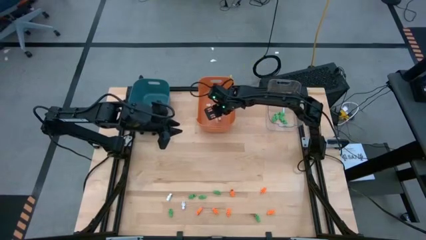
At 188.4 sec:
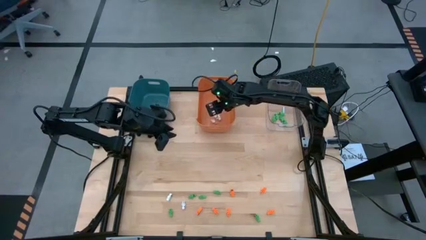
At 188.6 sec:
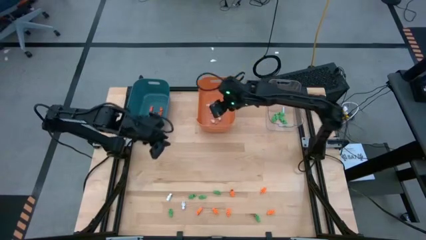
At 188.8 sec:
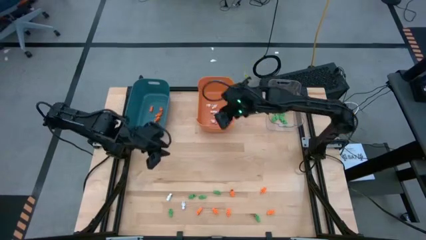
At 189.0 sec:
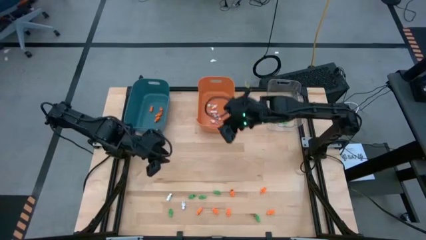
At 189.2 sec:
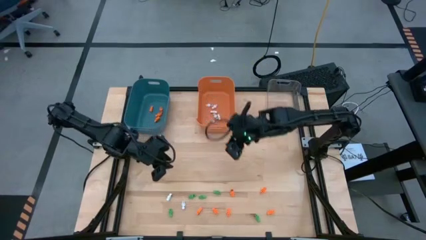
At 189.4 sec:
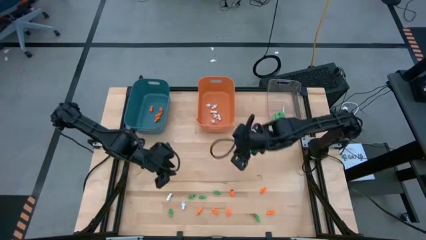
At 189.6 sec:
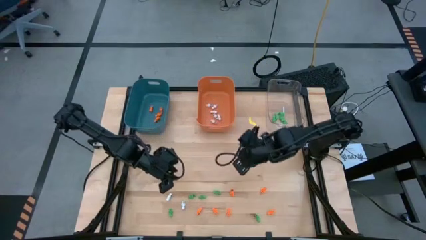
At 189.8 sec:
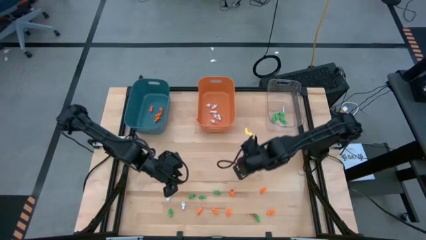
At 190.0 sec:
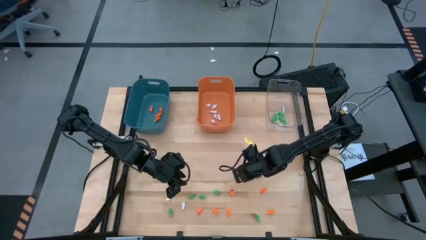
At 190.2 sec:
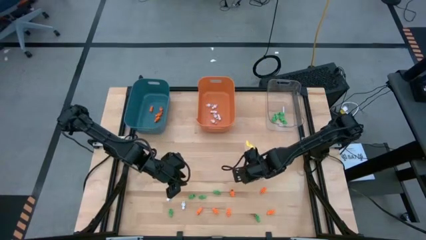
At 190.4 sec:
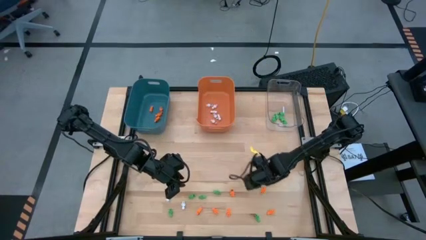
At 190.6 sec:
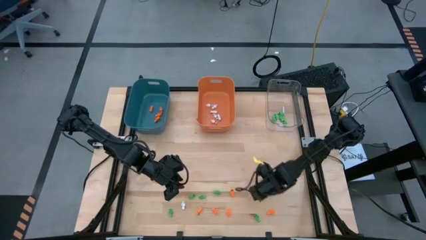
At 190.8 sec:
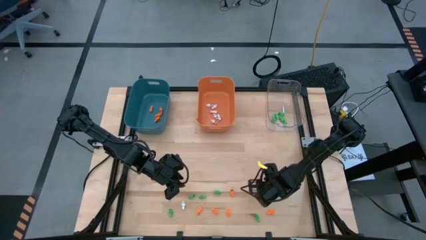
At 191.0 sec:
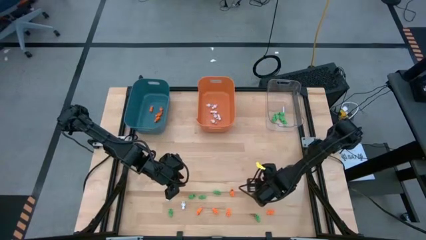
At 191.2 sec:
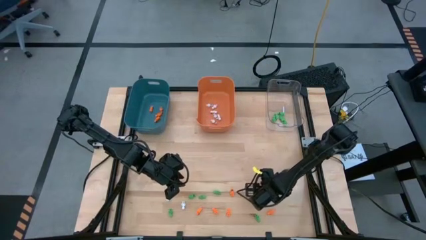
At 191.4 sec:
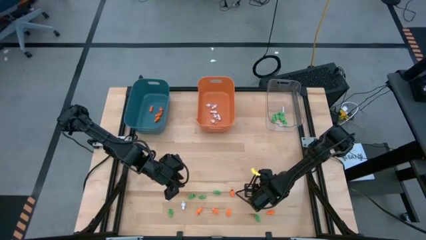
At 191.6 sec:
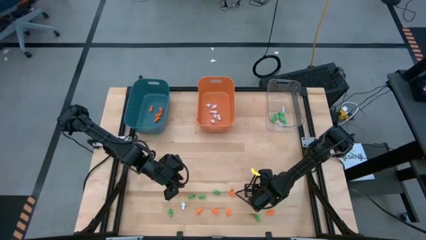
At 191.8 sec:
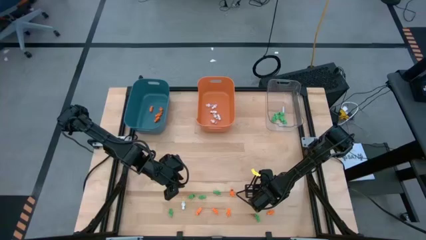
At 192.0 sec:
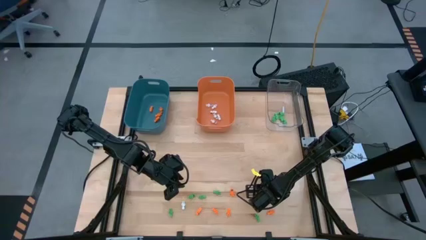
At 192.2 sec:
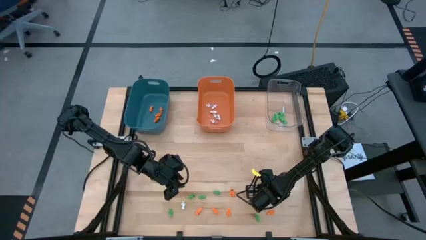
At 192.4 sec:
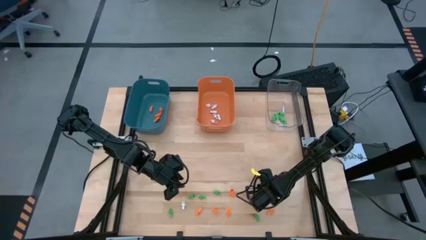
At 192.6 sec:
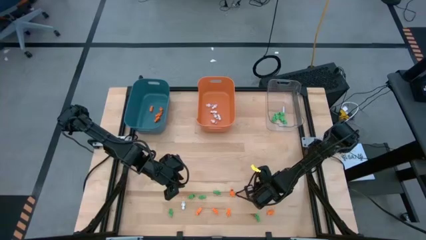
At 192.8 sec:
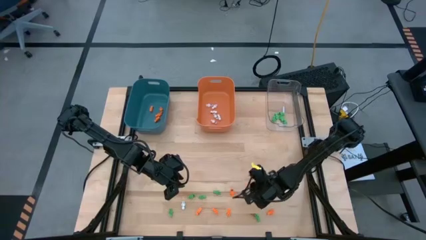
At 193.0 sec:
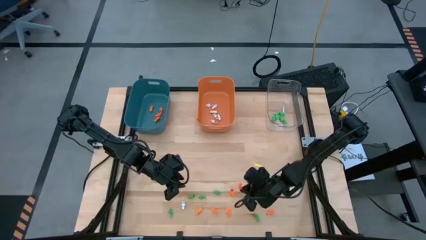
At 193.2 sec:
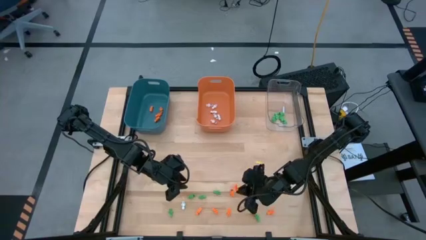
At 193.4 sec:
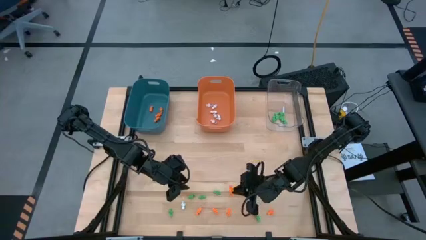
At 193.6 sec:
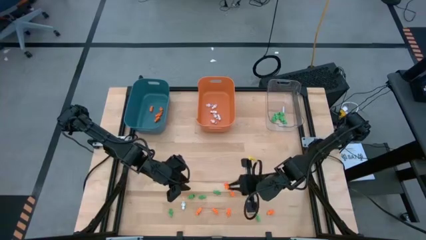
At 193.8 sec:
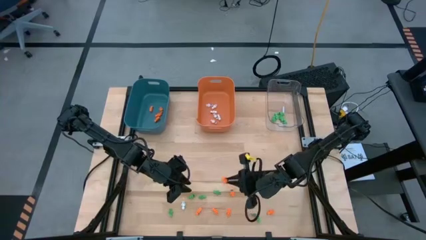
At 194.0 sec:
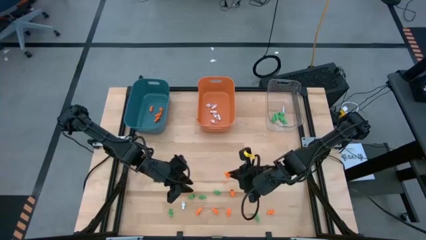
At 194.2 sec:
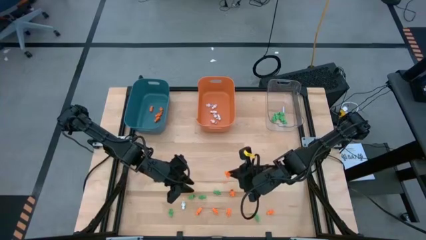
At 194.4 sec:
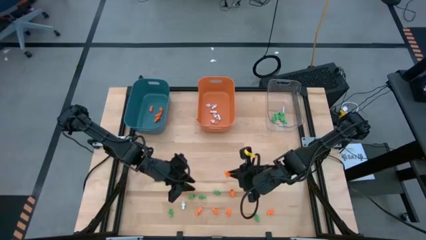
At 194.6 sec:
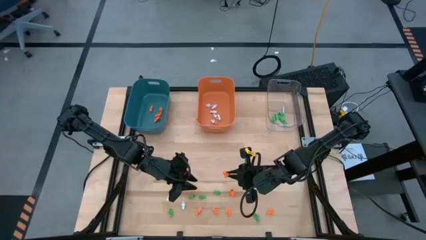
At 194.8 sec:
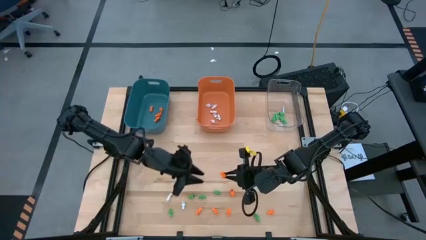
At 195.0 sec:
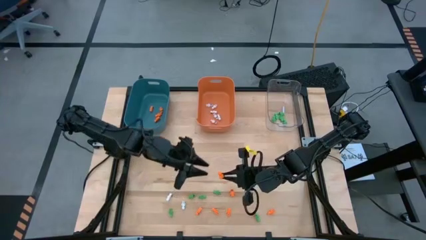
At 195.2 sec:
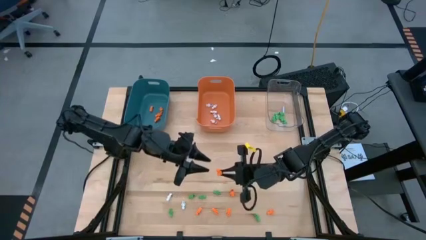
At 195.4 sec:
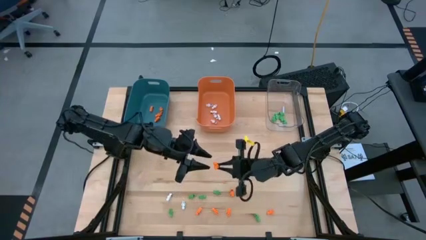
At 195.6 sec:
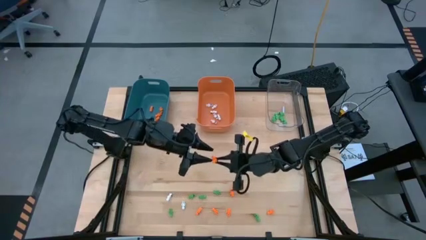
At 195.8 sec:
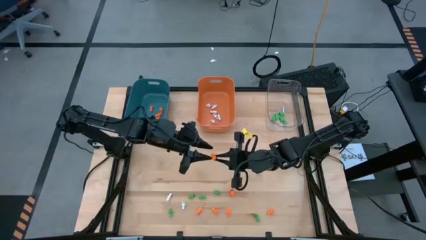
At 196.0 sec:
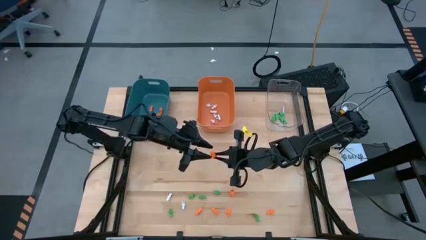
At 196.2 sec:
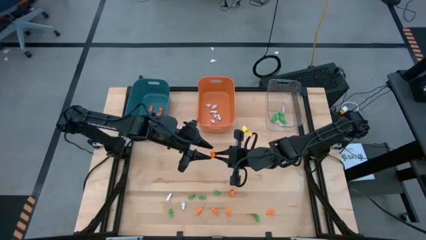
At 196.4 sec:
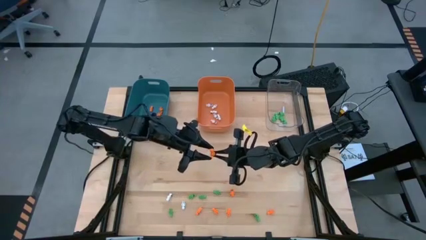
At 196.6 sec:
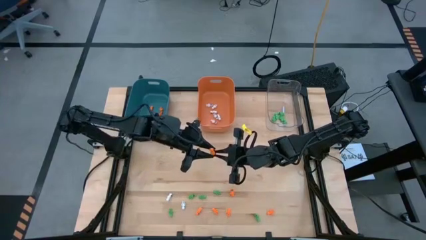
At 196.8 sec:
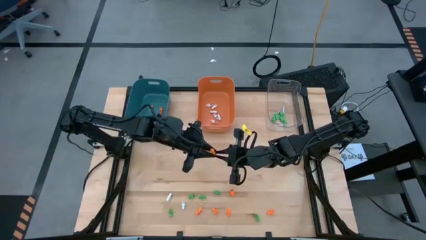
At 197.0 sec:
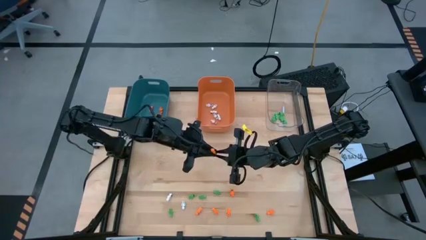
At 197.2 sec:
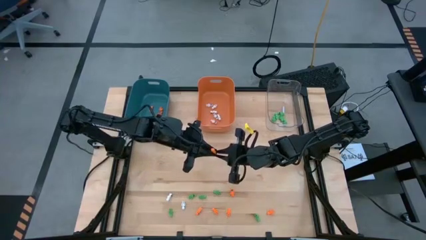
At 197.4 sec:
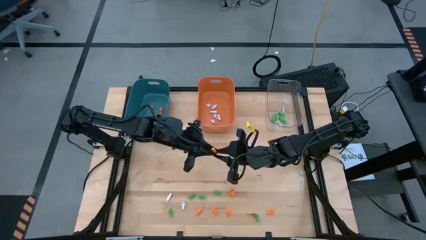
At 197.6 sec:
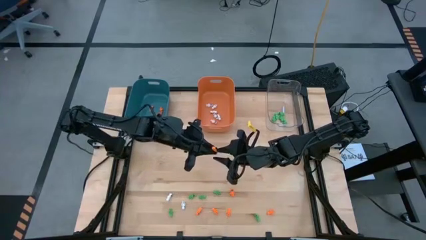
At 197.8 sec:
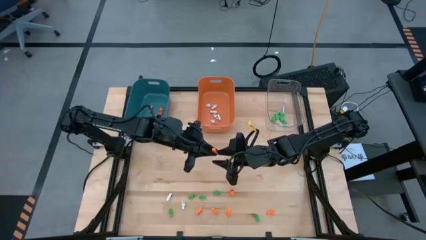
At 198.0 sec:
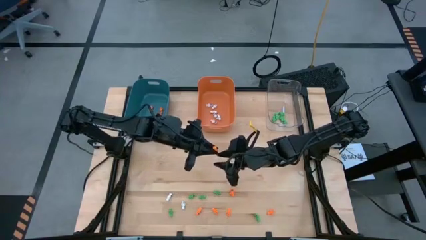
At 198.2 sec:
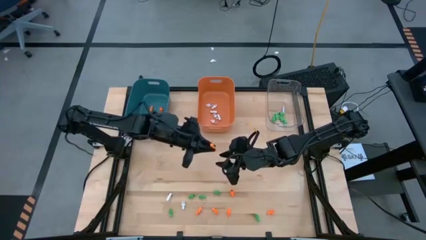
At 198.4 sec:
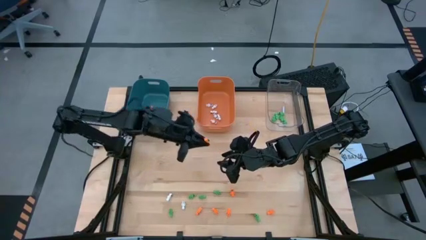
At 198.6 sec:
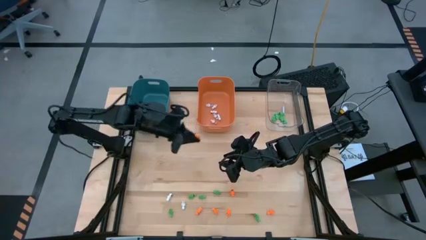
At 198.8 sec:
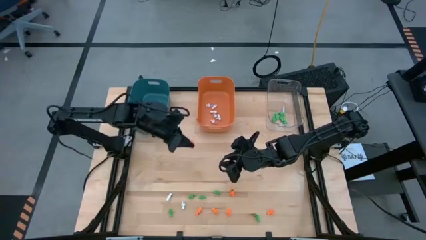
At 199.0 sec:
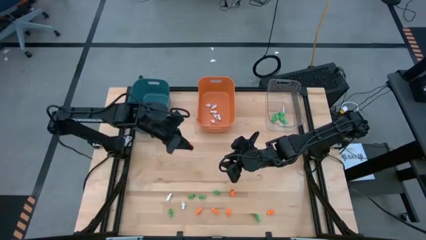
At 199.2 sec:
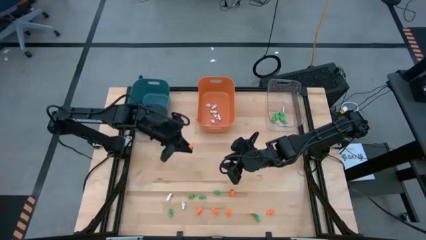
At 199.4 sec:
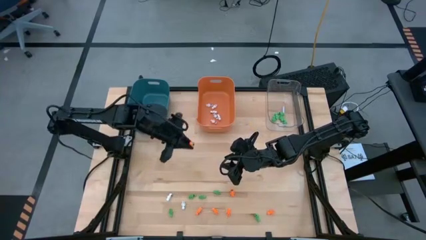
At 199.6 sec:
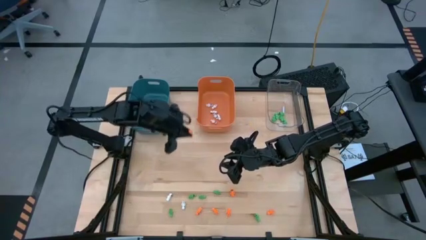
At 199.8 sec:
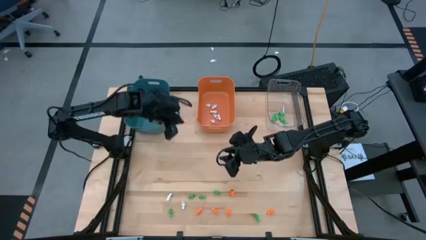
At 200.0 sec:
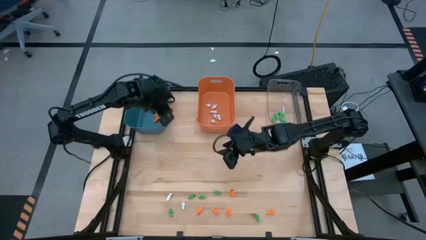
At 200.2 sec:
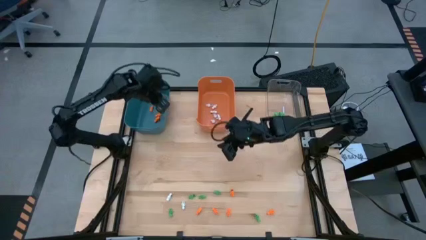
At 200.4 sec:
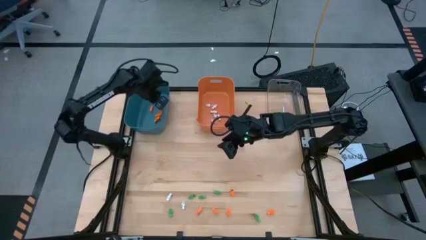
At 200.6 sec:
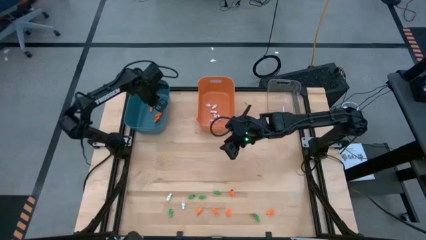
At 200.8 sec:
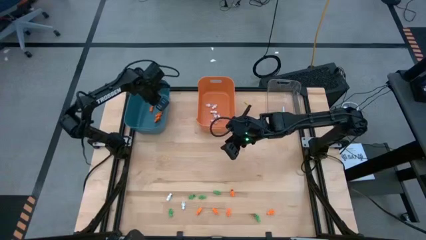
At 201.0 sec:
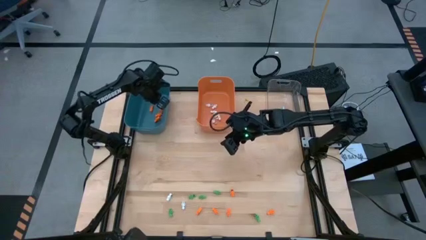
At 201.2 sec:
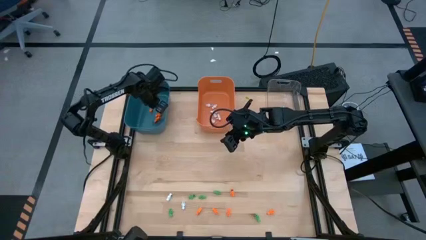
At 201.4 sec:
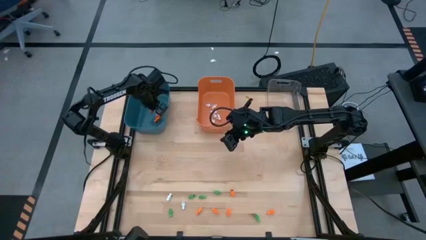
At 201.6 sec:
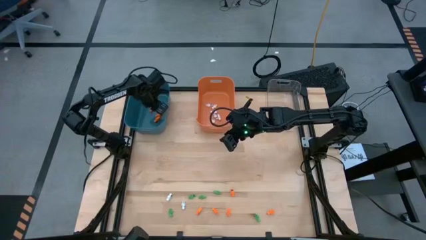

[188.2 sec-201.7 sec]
Task: Sort Halloween decoration
Put the orange skeleton toy into the blue bin
